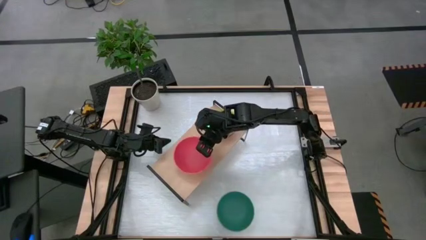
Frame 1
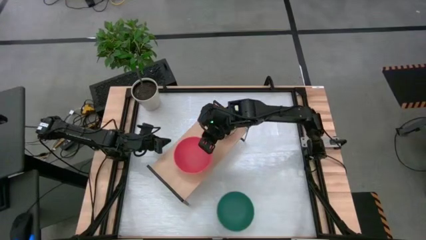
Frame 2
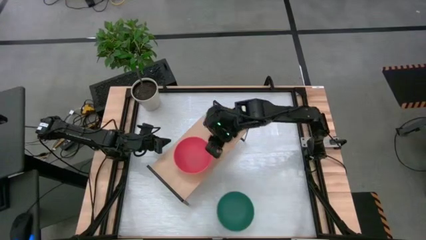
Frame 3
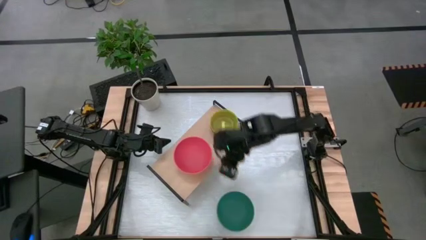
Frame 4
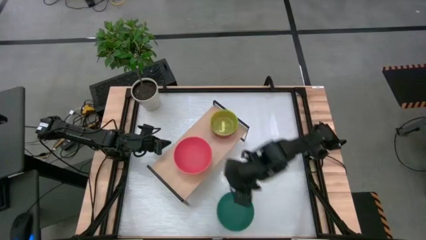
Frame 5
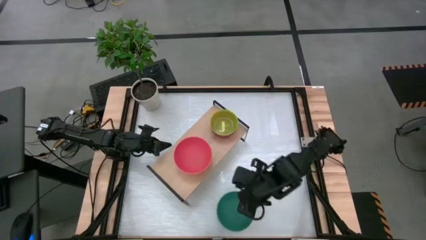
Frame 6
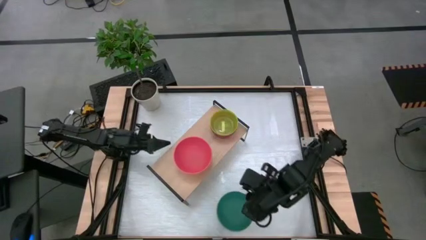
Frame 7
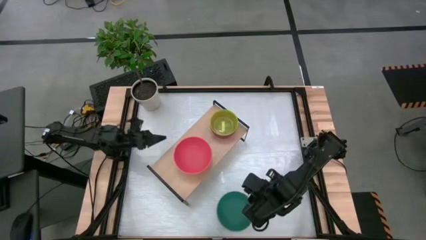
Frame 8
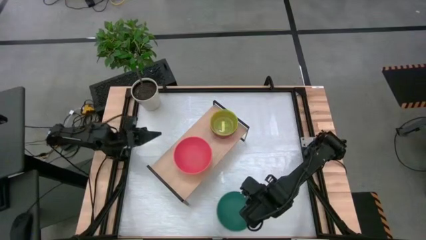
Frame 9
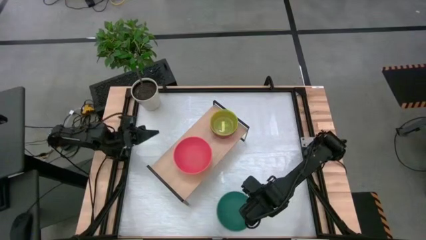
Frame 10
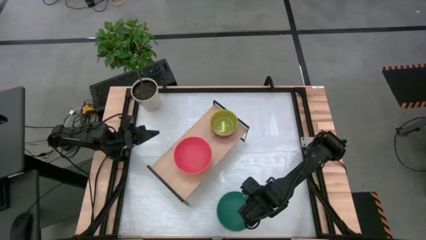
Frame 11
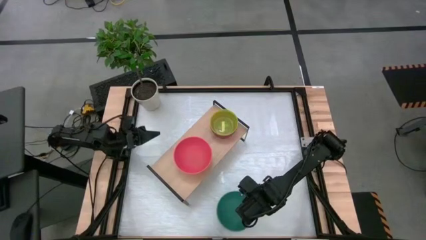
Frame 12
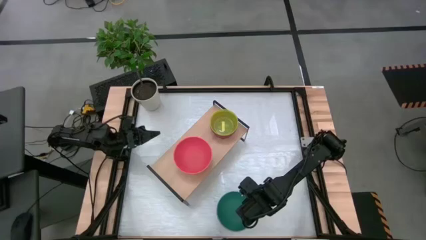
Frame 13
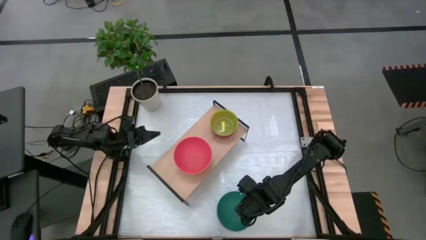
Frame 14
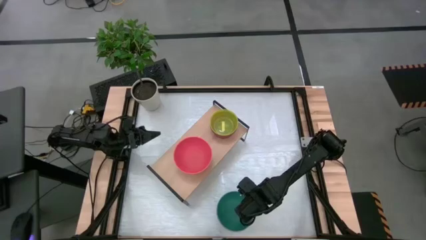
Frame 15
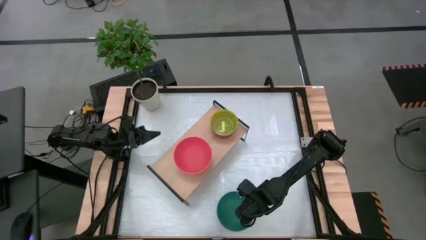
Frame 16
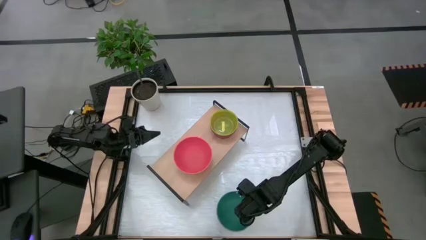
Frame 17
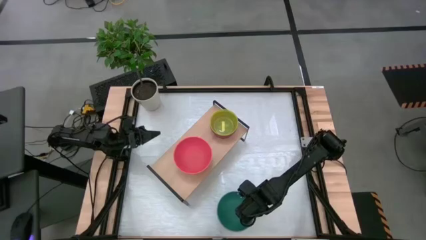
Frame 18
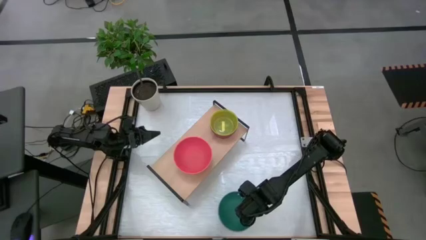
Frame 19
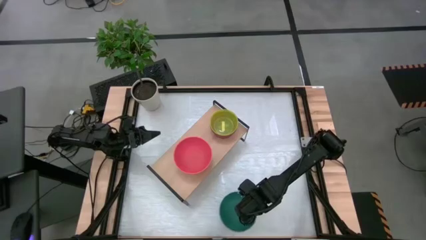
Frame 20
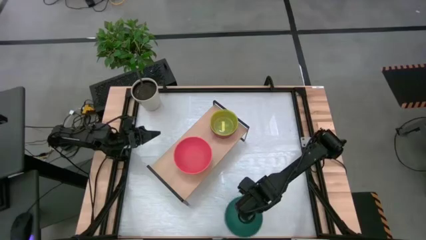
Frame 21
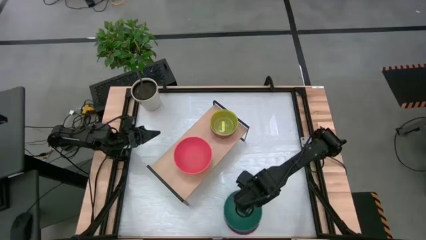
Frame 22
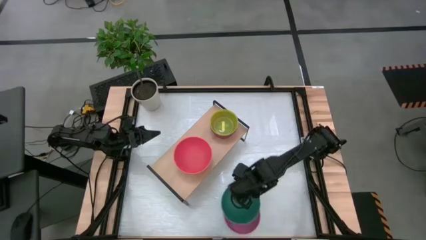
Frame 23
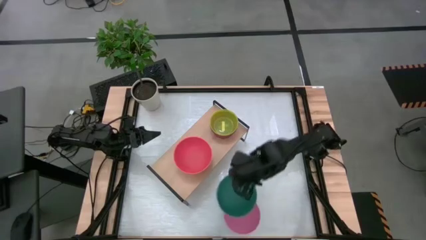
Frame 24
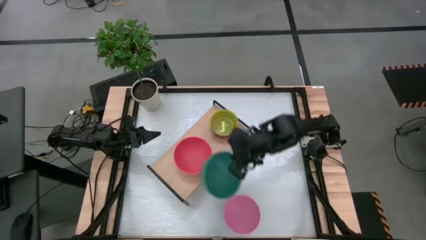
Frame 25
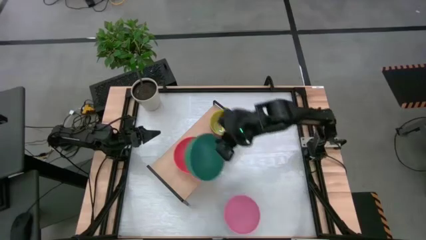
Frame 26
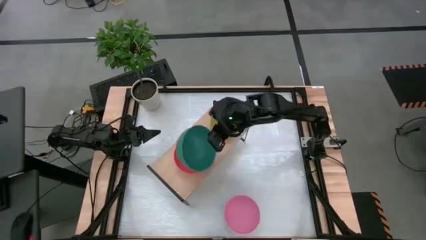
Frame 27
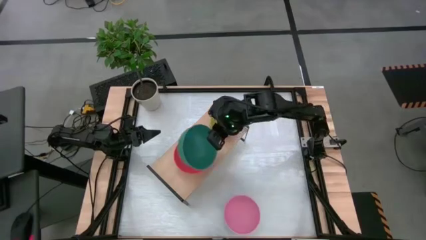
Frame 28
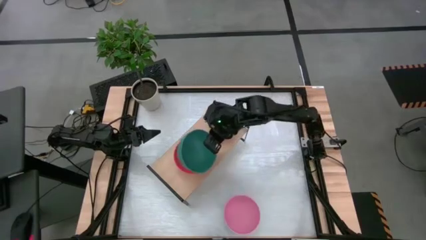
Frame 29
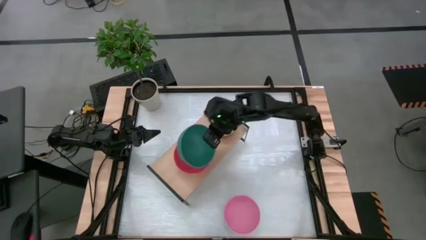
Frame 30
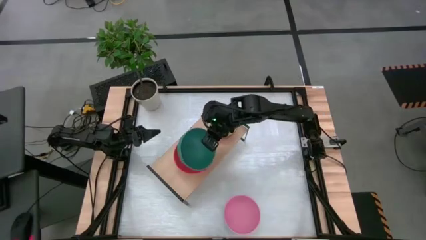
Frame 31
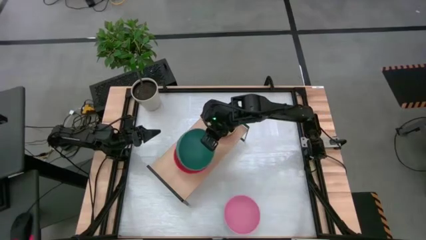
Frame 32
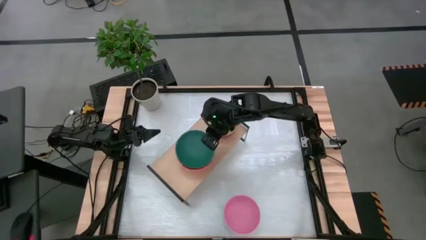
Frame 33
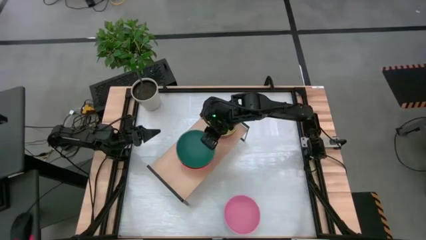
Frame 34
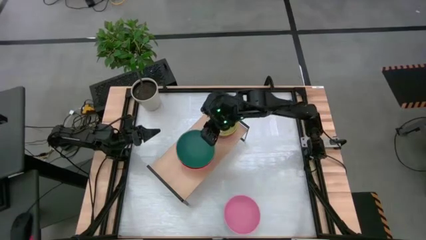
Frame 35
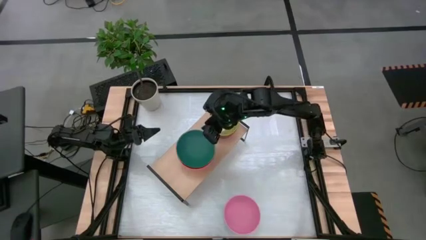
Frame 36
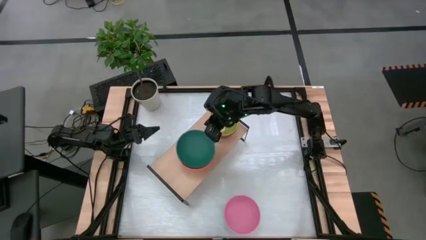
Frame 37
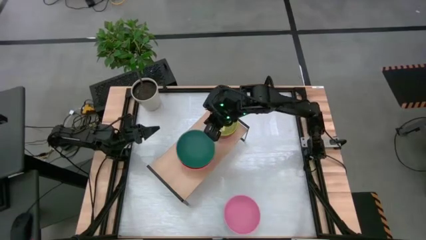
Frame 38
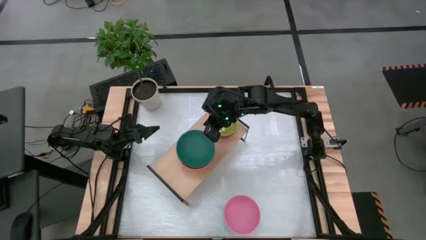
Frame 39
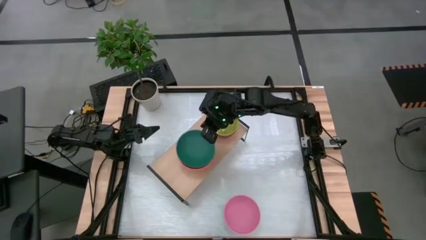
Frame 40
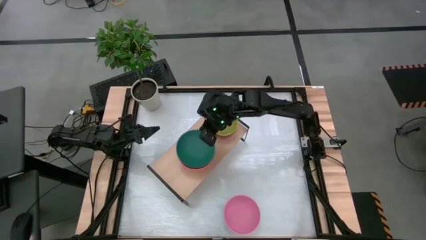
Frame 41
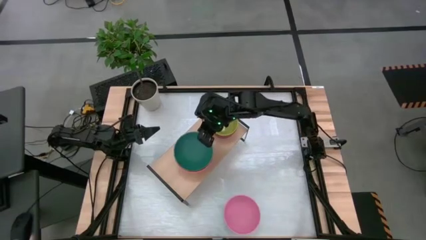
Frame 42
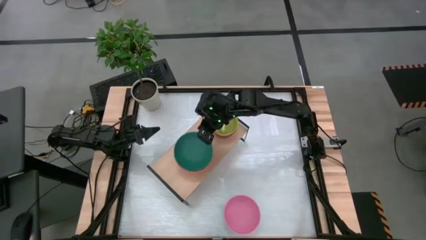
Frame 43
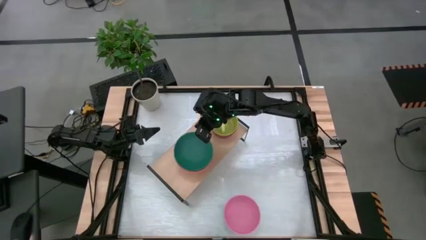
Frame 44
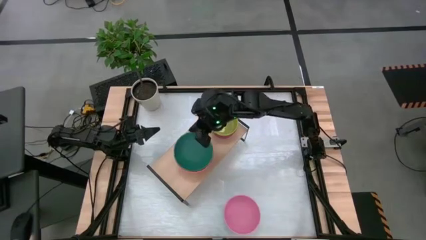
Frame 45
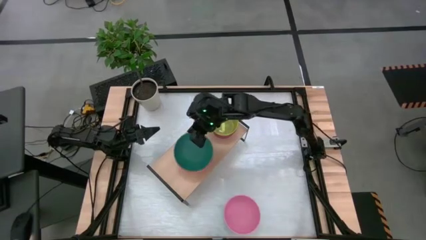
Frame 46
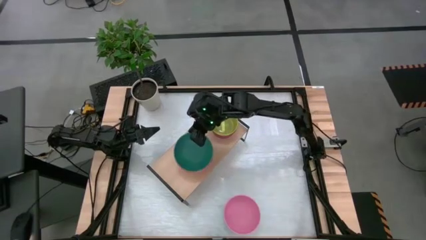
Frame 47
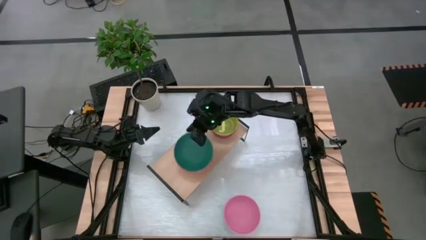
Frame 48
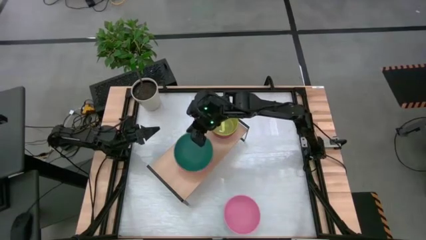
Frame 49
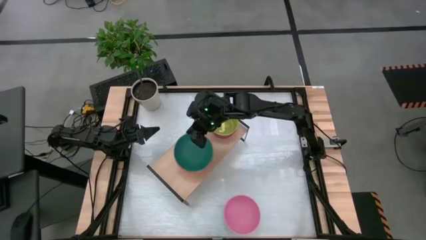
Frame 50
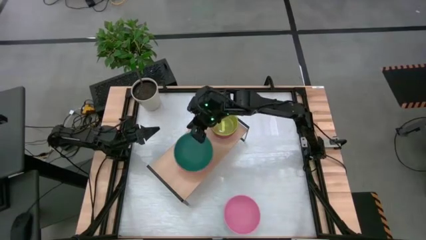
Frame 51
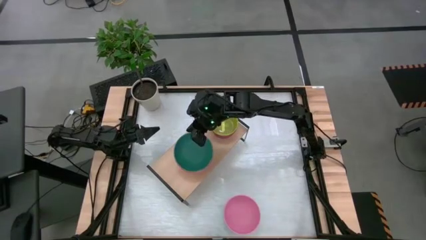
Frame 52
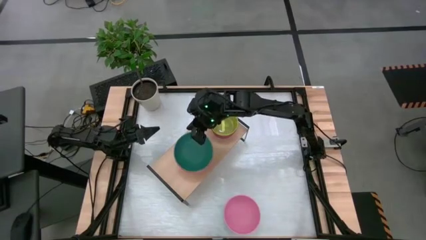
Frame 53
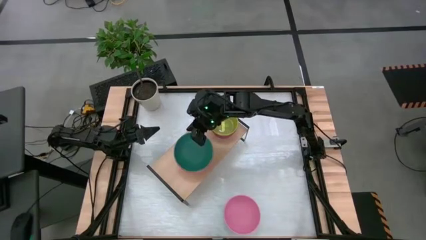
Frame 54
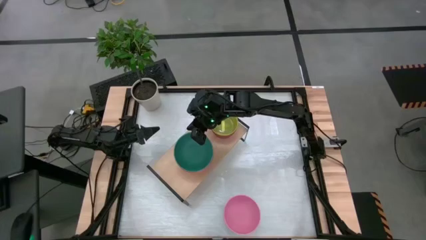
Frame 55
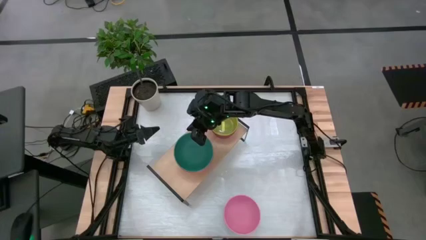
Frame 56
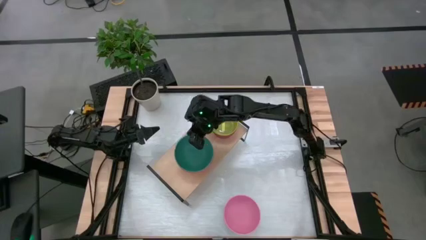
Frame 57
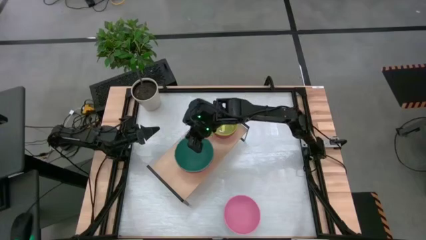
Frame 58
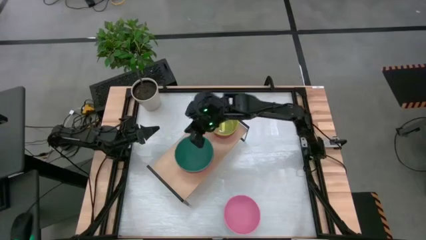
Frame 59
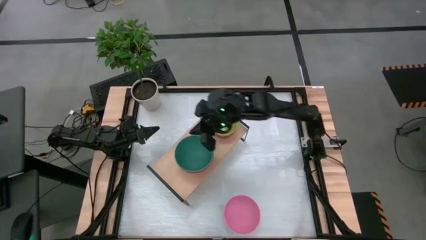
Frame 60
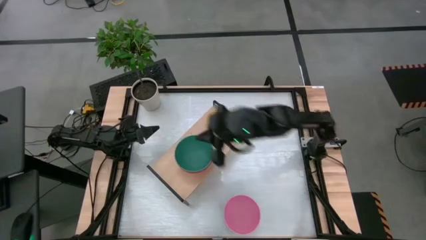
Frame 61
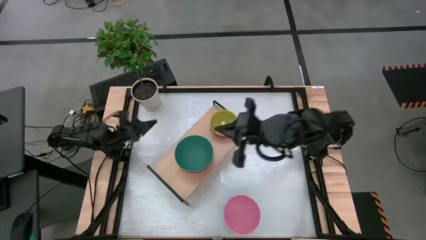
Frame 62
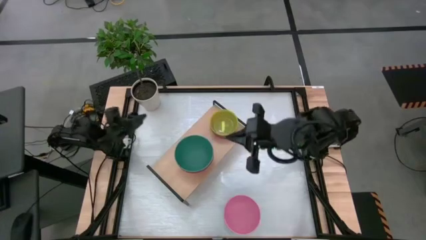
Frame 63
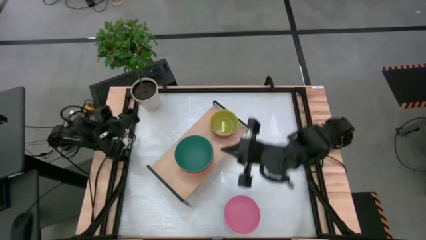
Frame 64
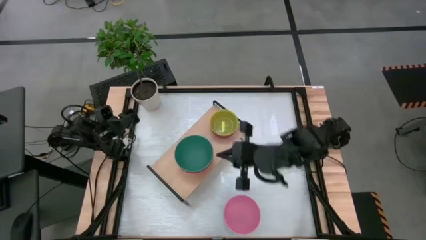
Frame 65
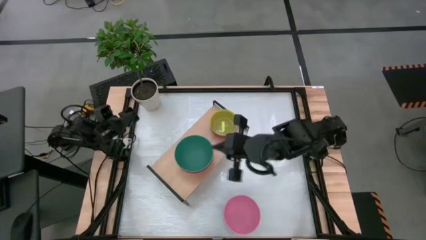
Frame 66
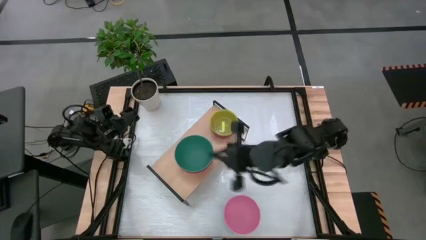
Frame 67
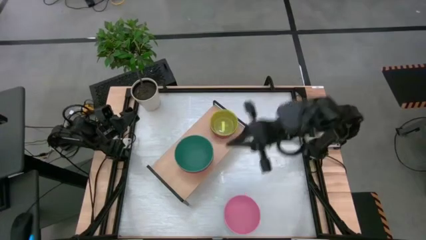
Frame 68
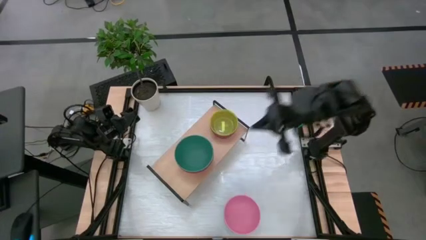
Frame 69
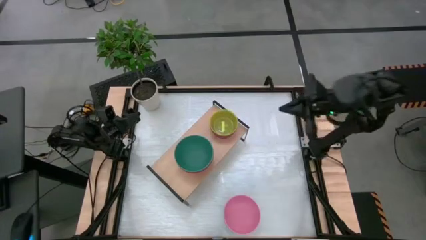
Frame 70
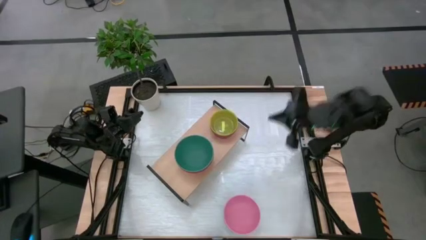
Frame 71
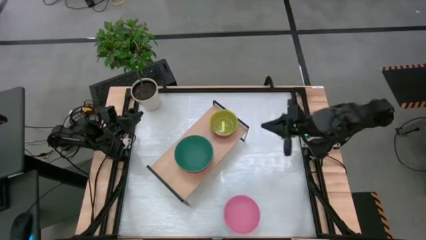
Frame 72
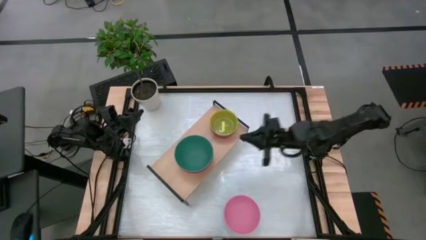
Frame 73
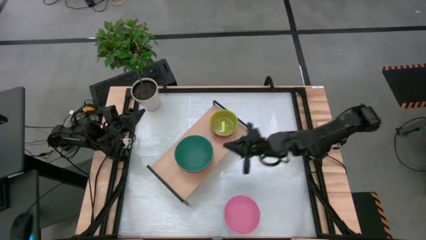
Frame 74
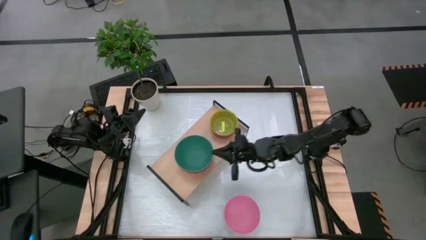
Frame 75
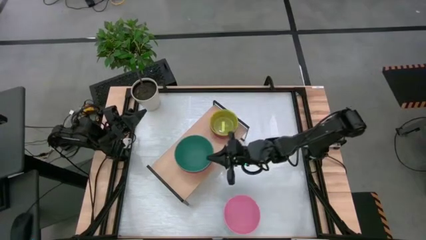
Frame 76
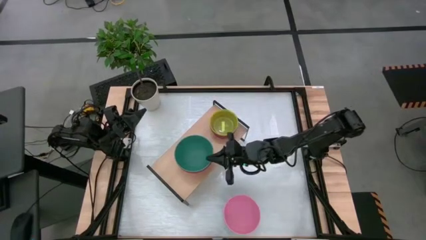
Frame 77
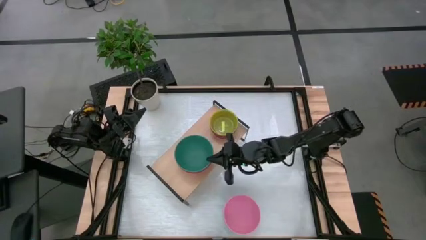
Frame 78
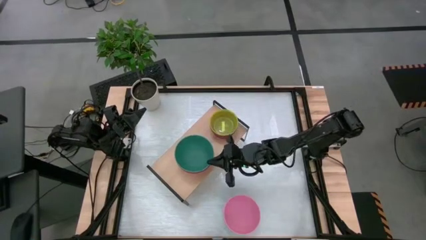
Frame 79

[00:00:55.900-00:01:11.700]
Task: Place and stack bowls onto a shelf
Stack the green bowl on top of the red bowl into the shelf
